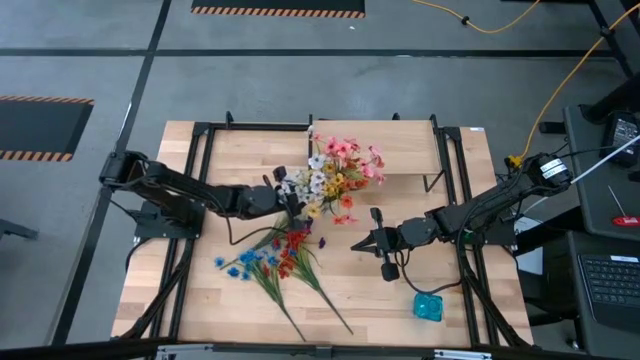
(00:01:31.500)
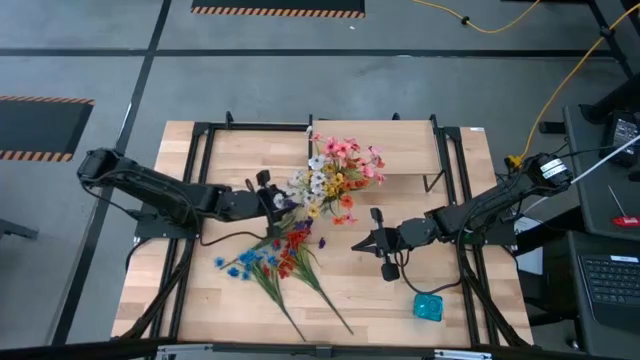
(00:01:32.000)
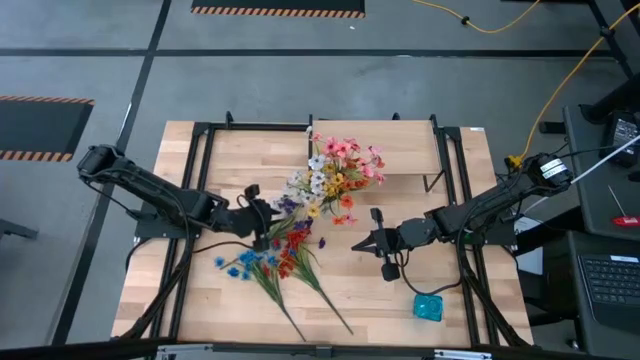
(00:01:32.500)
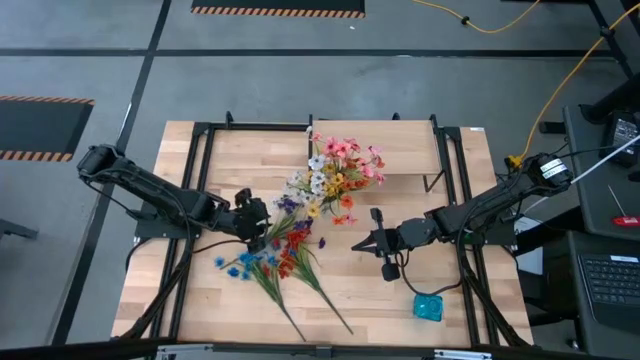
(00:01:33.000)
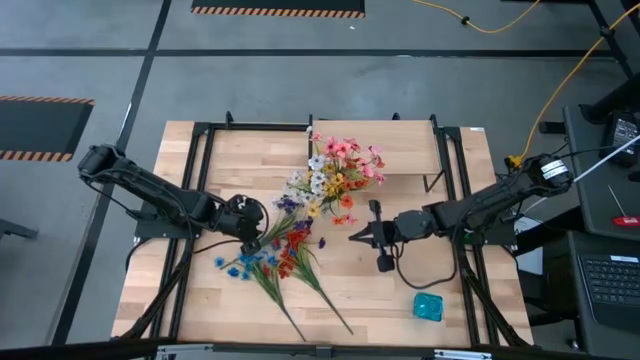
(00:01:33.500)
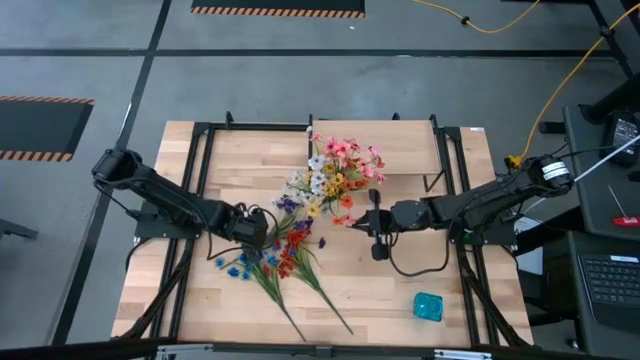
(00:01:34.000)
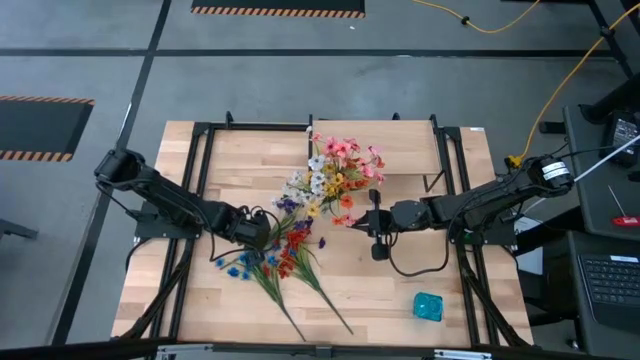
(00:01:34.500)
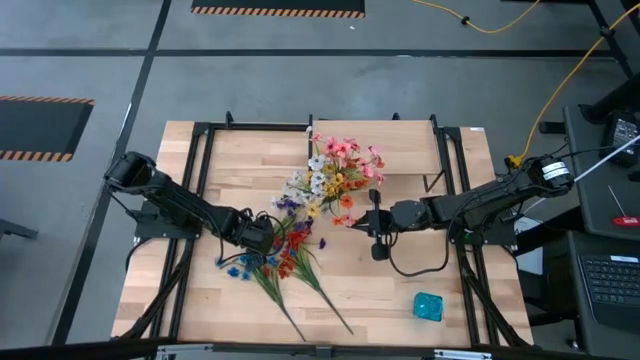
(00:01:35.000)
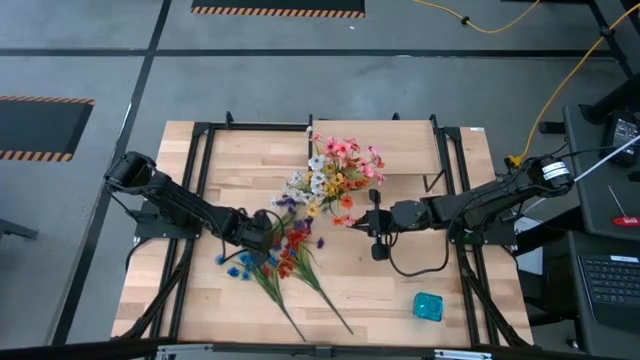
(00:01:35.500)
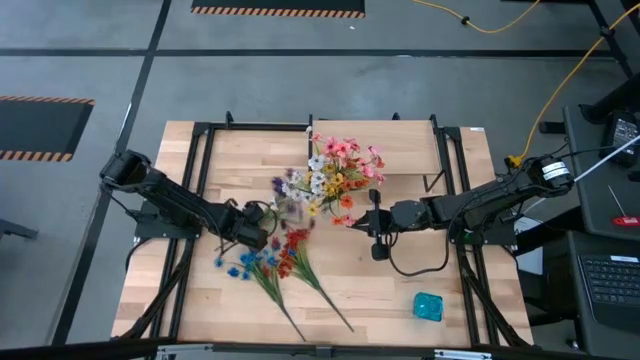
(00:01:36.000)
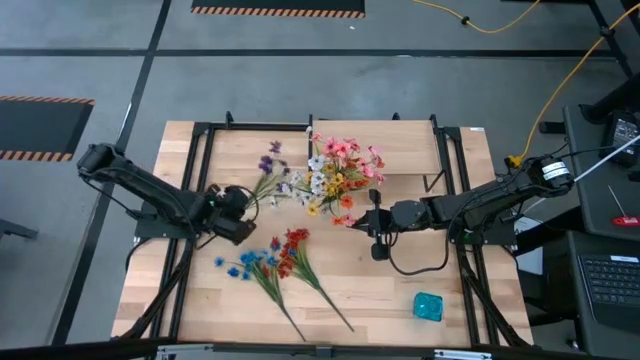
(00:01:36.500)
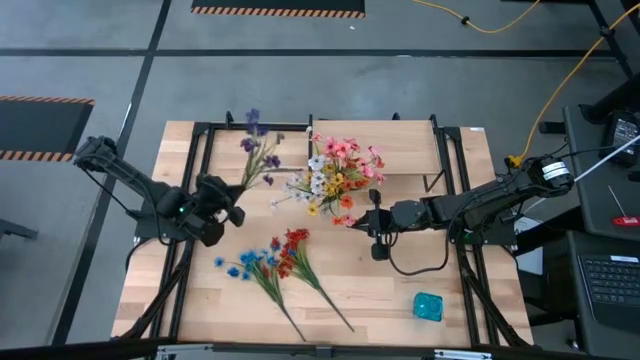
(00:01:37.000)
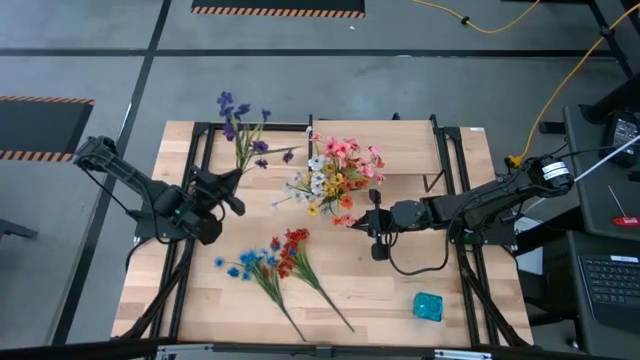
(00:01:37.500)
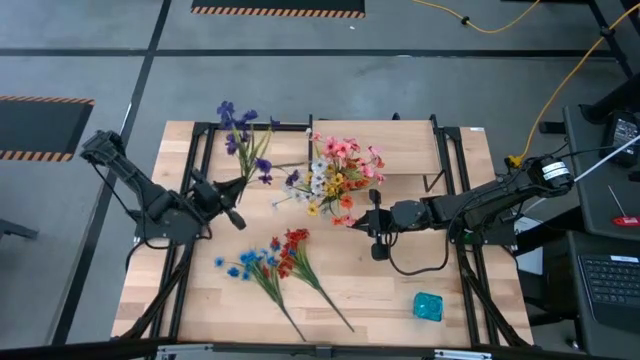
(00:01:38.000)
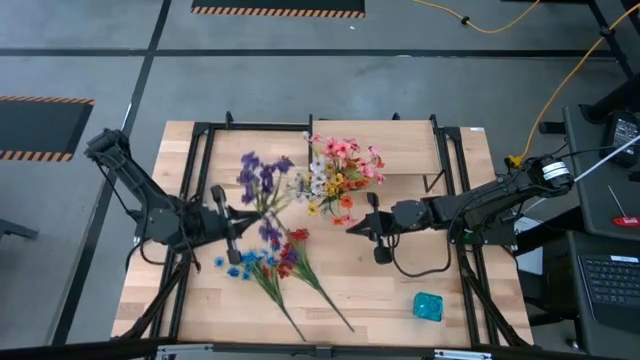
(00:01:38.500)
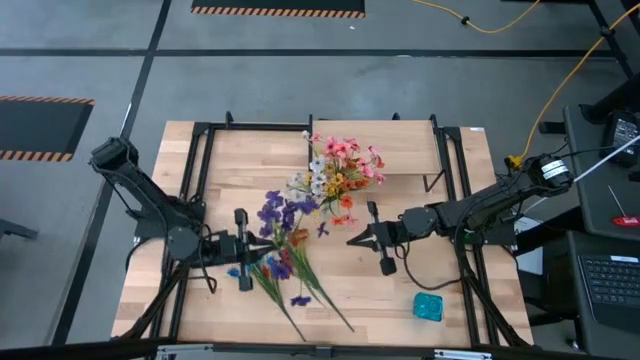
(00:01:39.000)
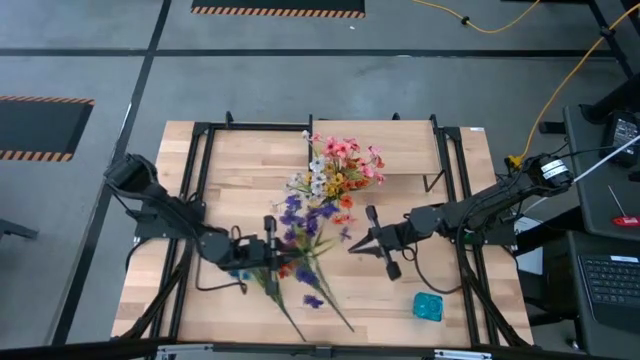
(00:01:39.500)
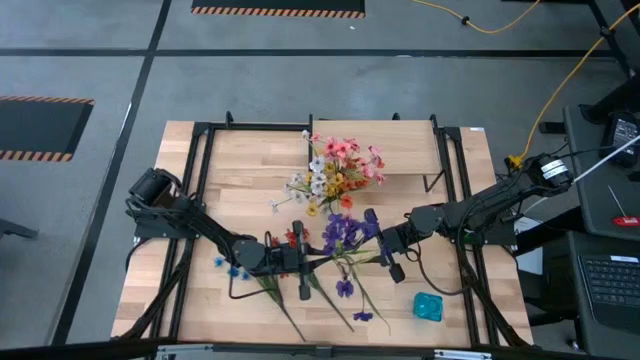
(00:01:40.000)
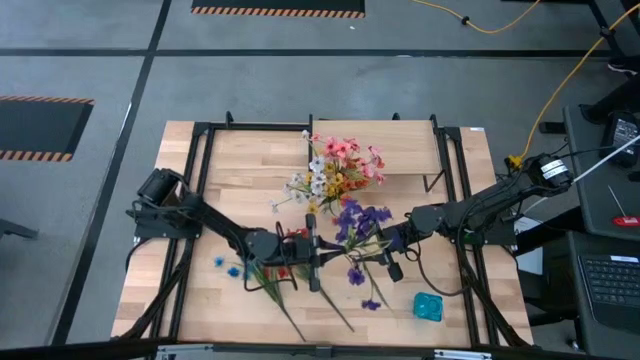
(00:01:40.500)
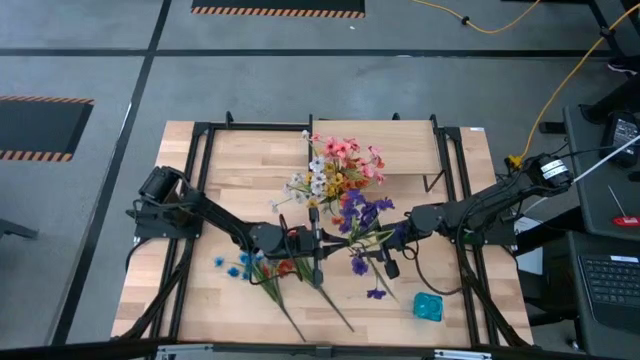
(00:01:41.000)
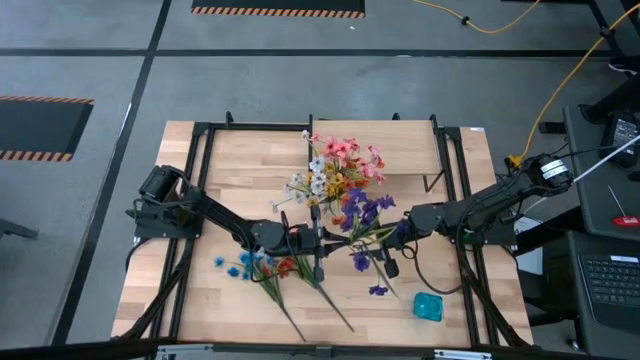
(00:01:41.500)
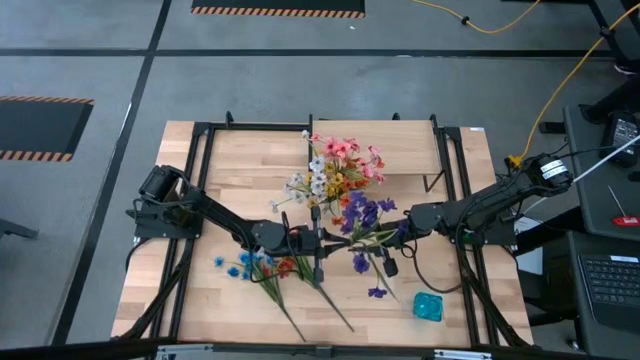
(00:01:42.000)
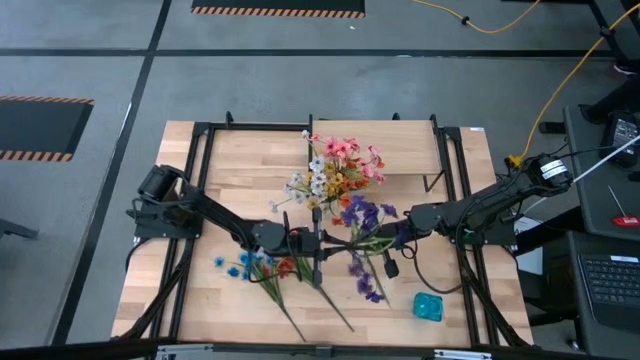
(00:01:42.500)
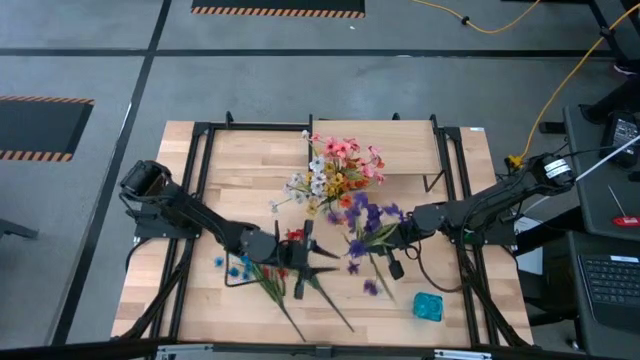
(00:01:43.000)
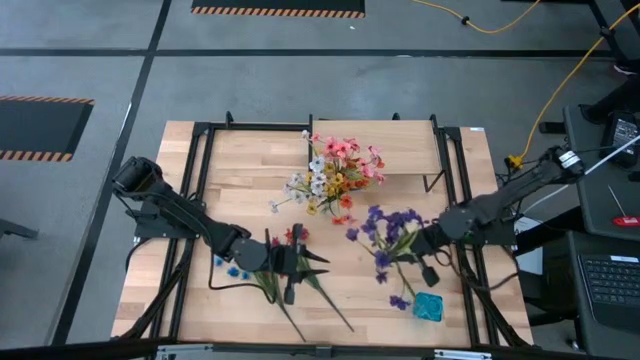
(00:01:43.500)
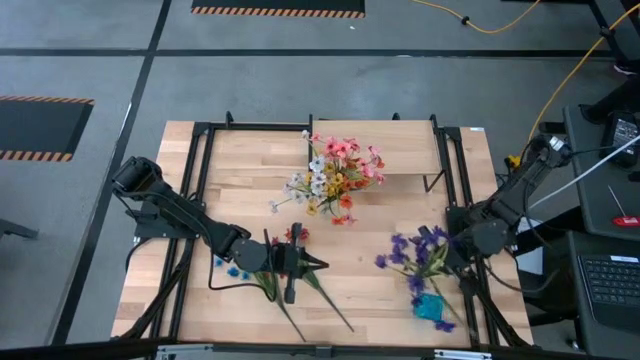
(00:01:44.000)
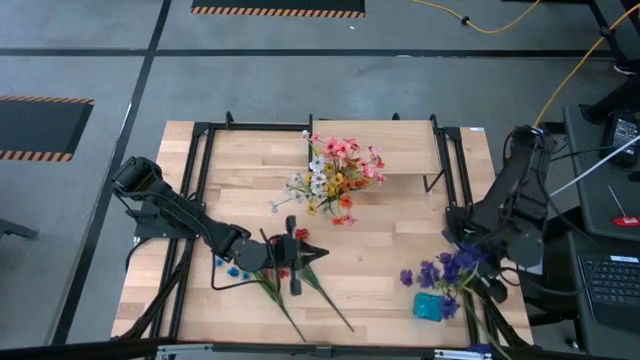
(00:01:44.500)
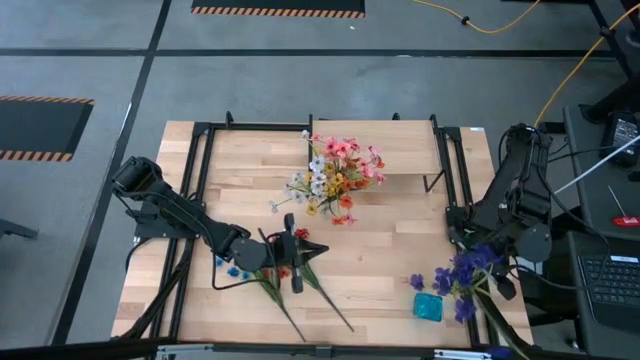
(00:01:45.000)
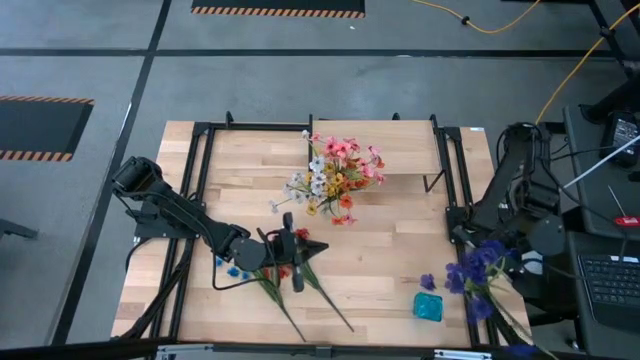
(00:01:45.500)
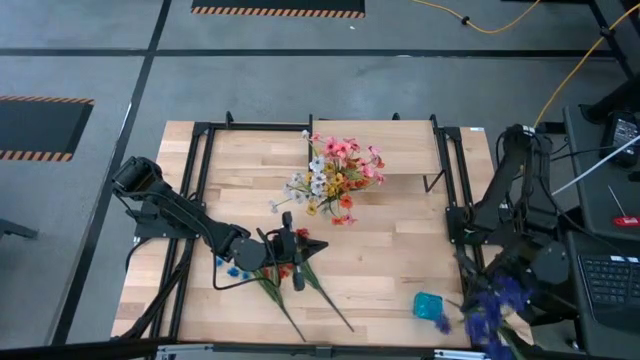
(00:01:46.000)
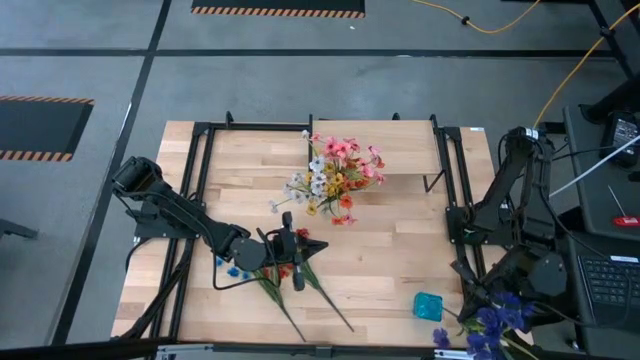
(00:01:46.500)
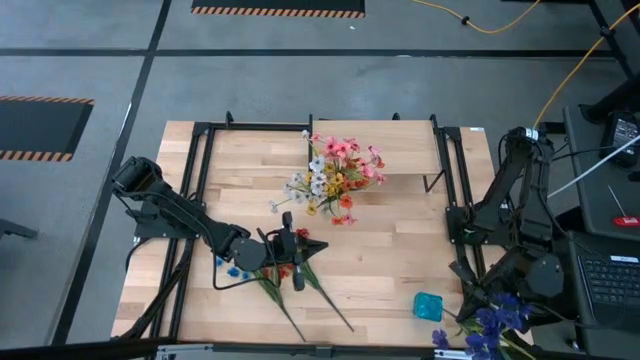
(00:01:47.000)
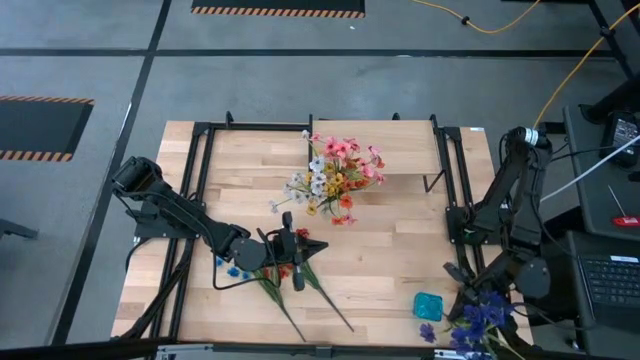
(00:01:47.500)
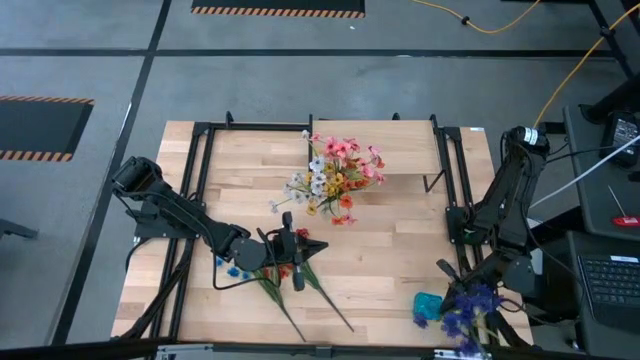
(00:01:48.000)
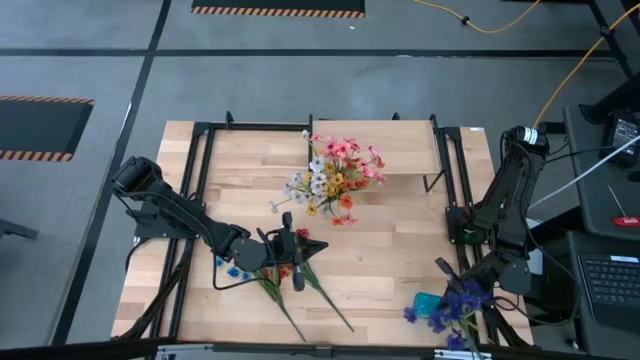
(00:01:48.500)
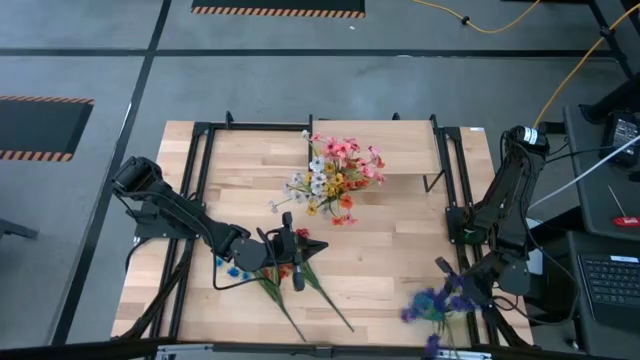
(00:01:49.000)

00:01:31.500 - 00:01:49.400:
Task: Pick and place flowers into a vace then onto a shelf
Put the violet flowers into the blue vase

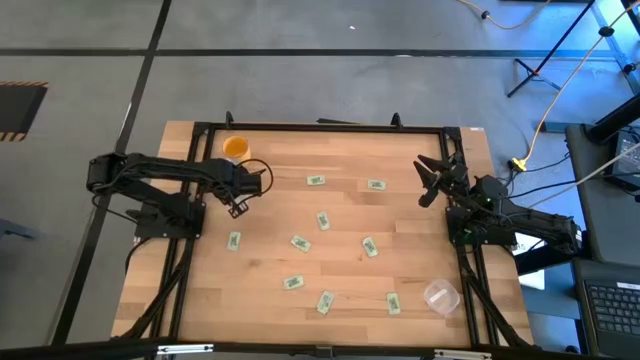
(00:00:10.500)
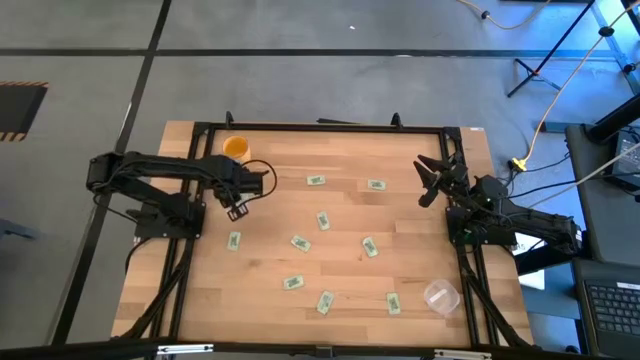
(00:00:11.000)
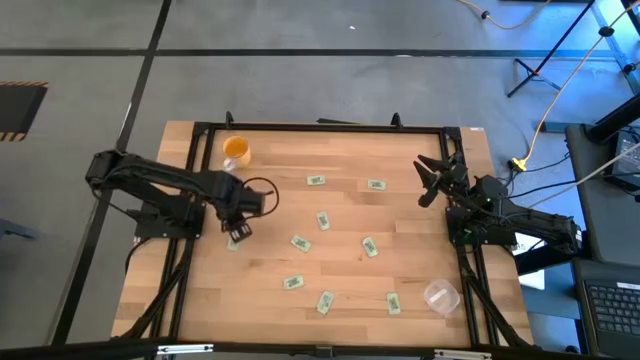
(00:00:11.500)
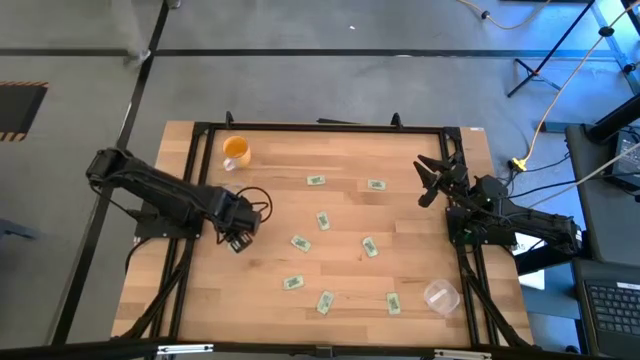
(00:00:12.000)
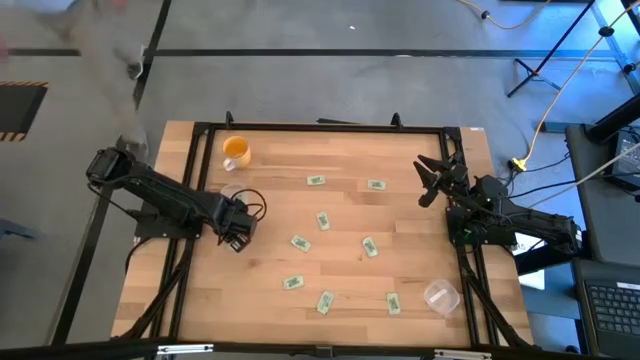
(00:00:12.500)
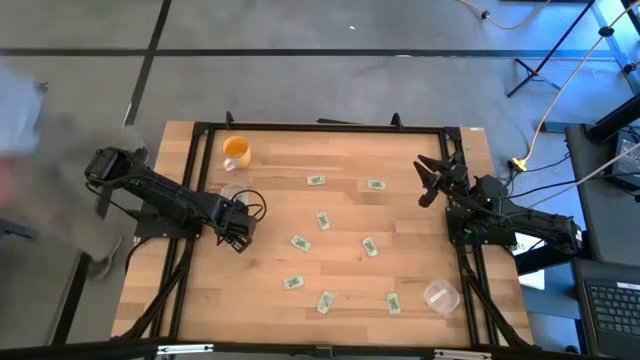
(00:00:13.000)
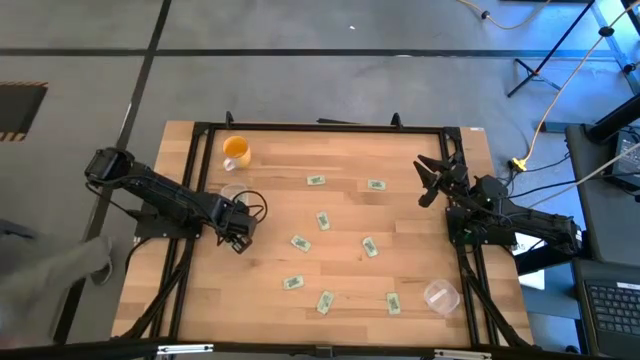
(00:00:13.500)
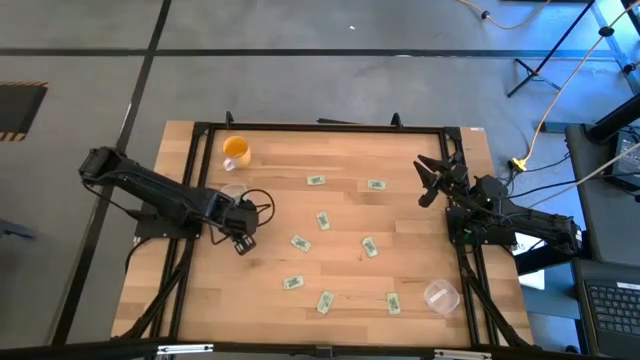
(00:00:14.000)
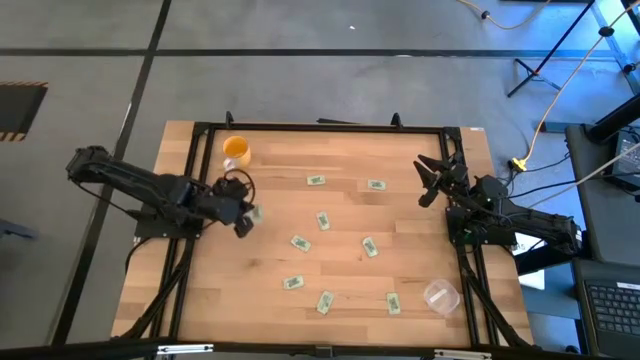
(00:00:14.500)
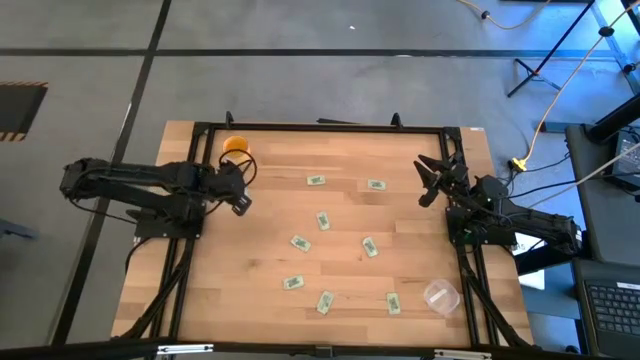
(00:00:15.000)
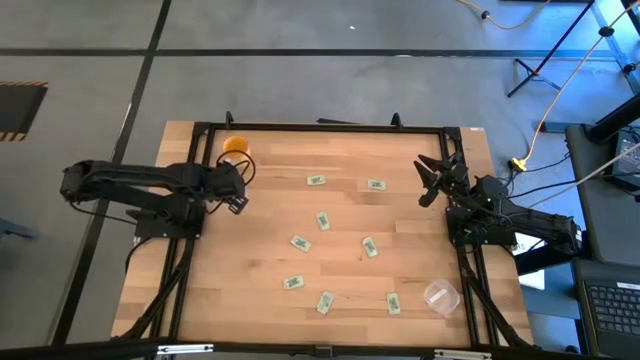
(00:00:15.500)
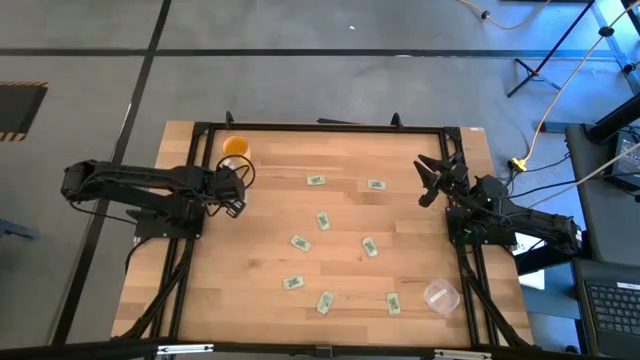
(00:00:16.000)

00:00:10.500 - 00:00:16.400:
Task: Pick and place items into bin
Put the green stevia packet into the top transparent bin
